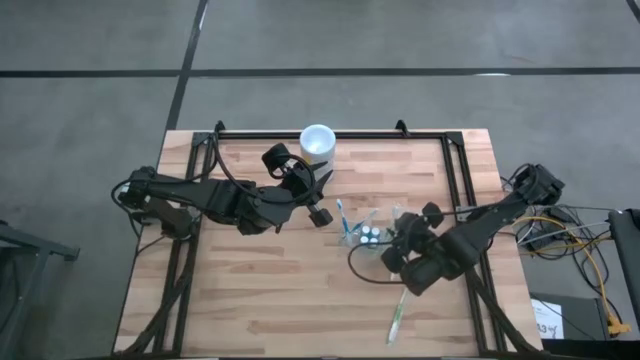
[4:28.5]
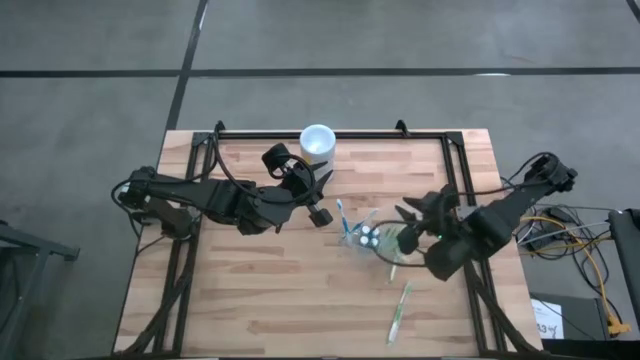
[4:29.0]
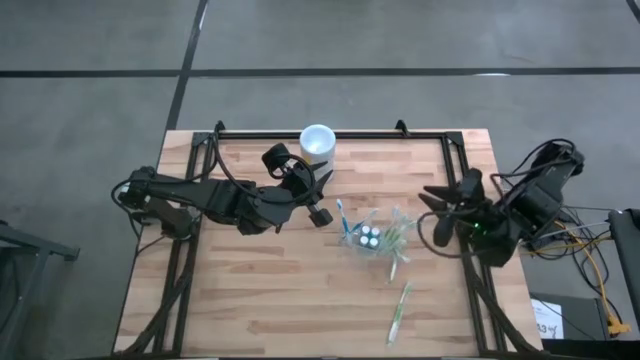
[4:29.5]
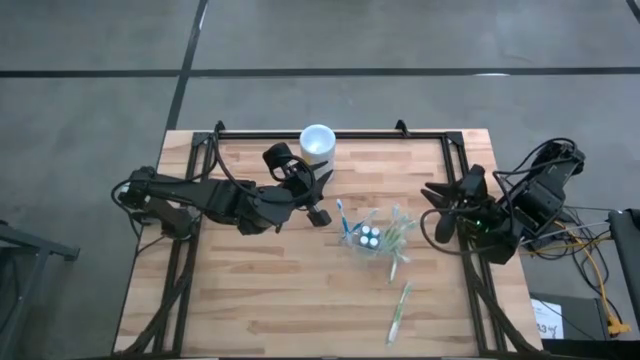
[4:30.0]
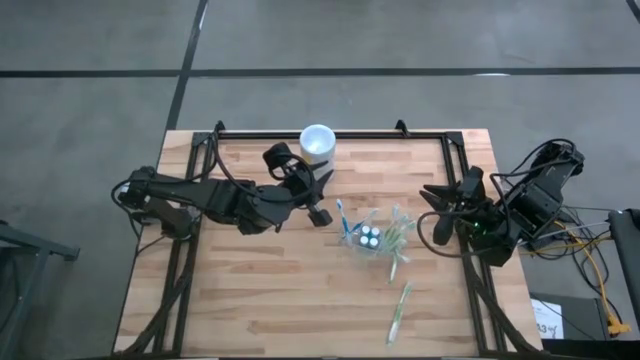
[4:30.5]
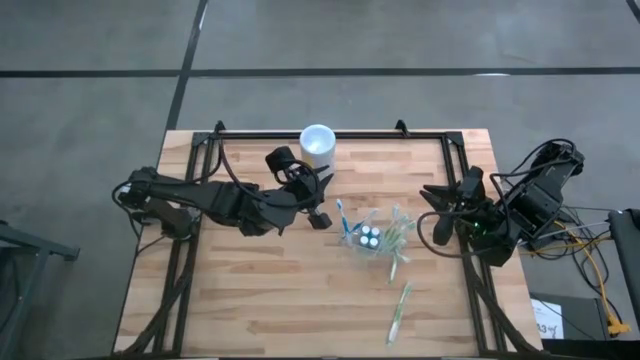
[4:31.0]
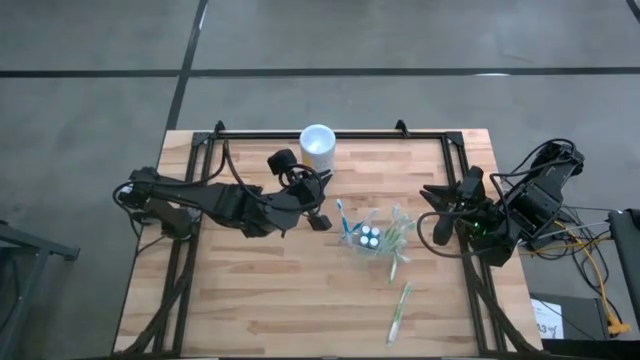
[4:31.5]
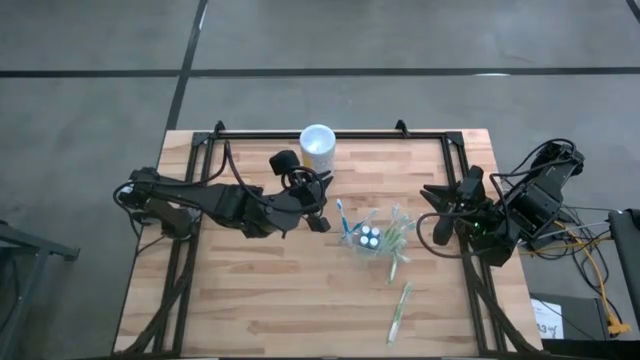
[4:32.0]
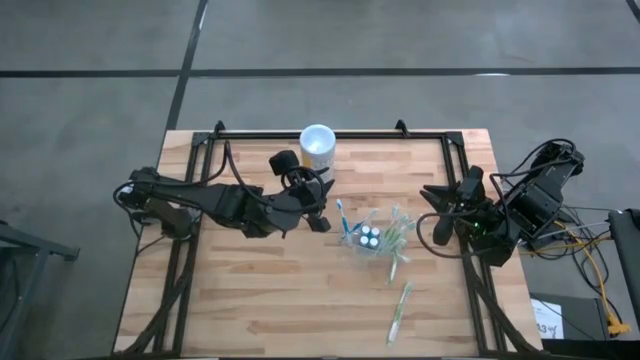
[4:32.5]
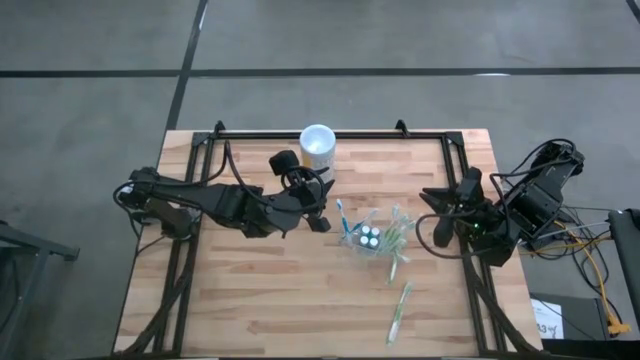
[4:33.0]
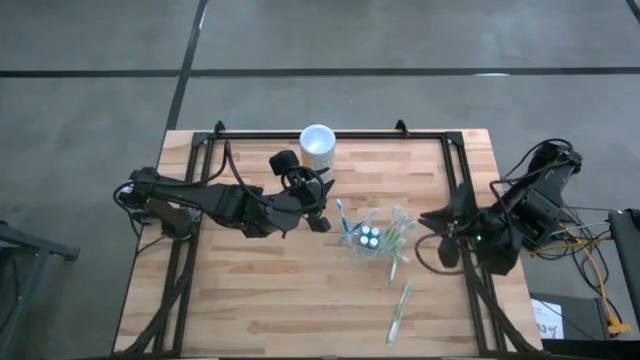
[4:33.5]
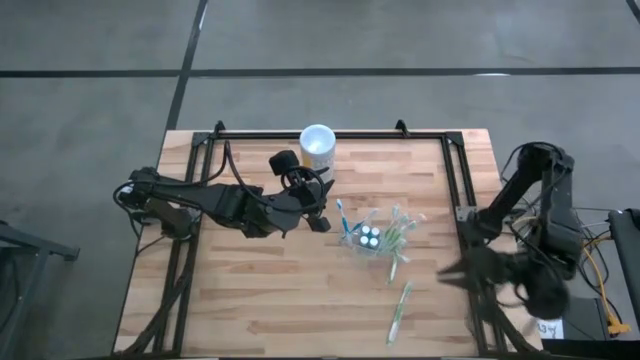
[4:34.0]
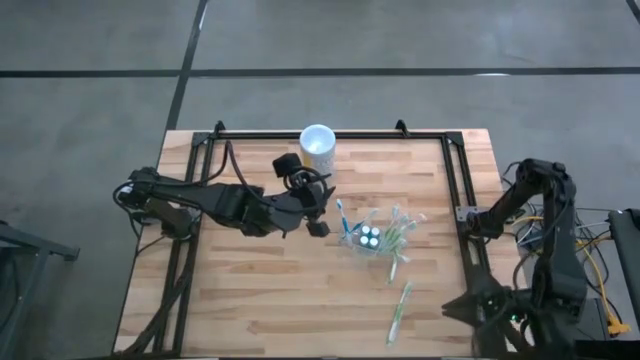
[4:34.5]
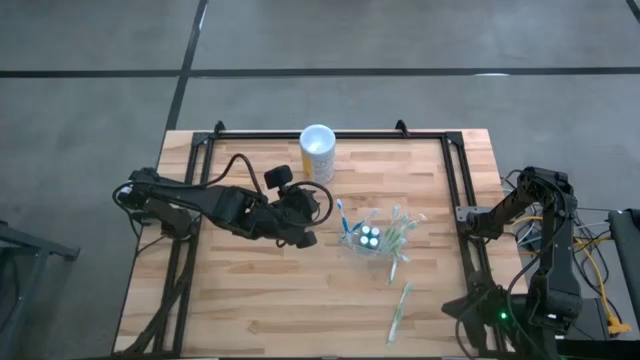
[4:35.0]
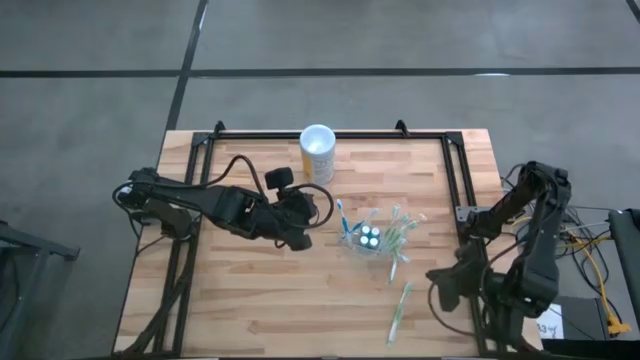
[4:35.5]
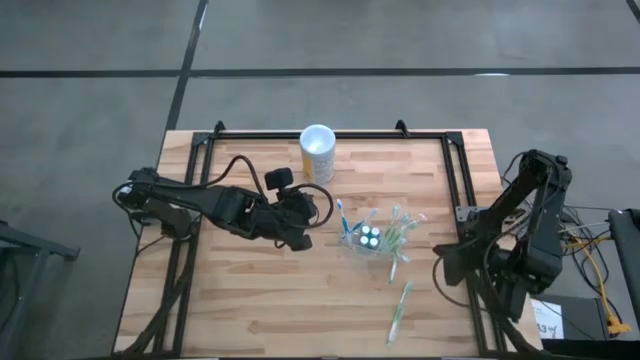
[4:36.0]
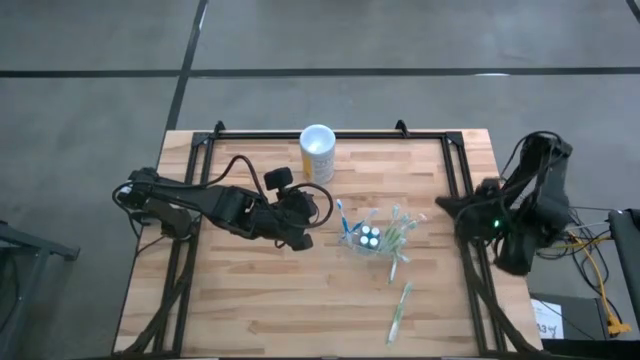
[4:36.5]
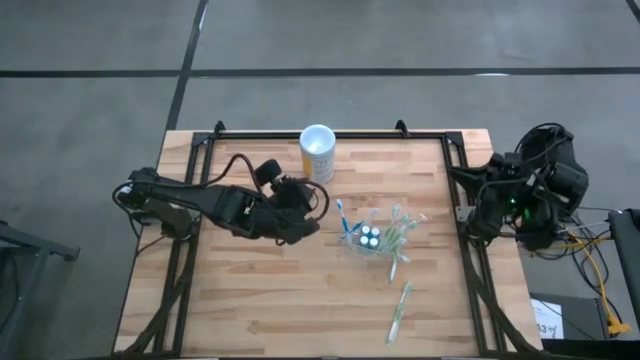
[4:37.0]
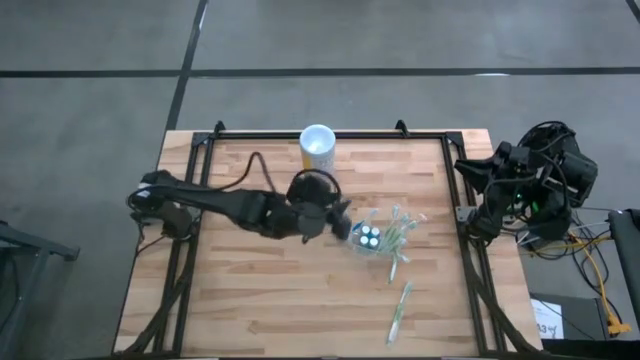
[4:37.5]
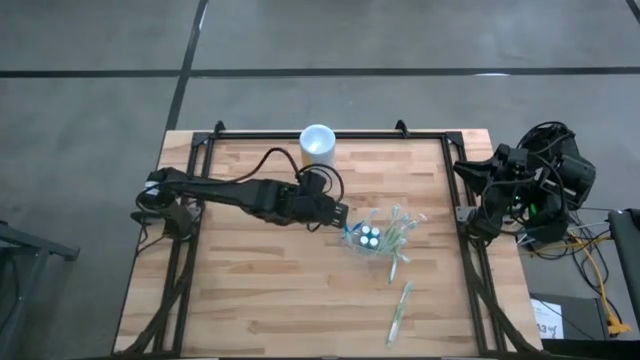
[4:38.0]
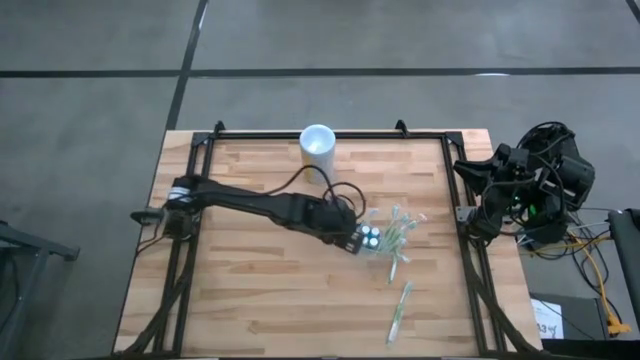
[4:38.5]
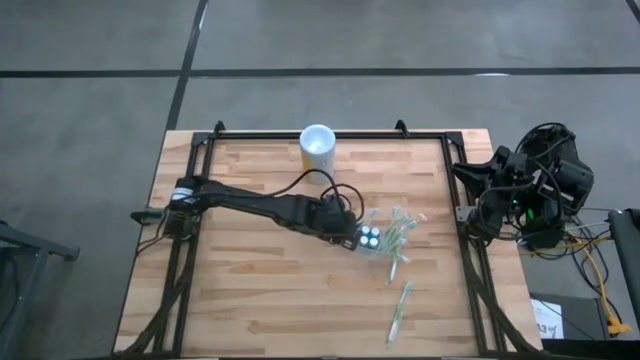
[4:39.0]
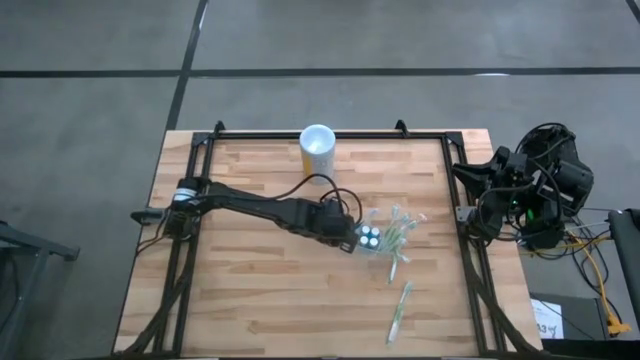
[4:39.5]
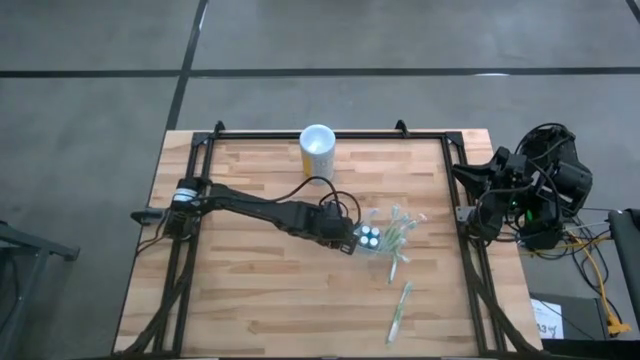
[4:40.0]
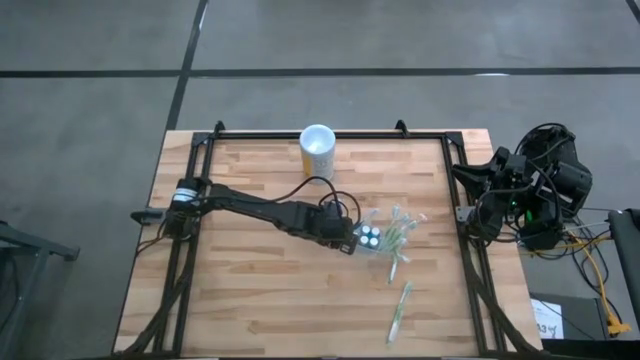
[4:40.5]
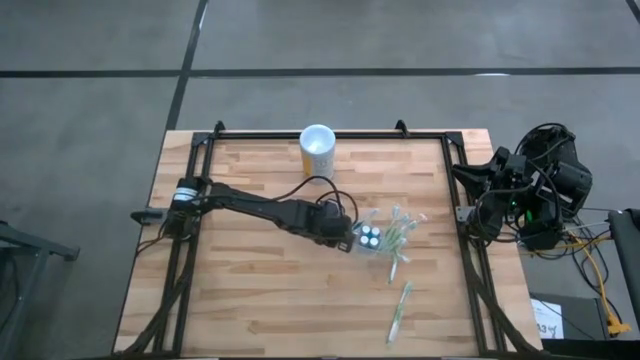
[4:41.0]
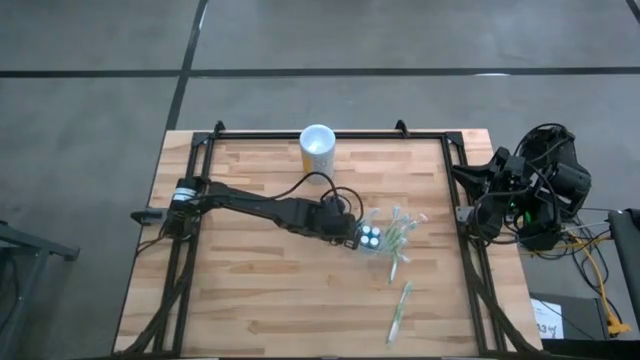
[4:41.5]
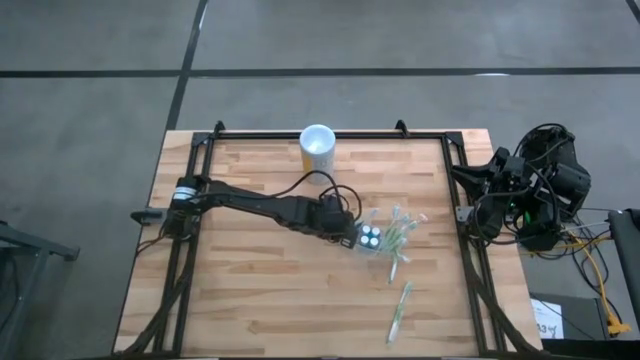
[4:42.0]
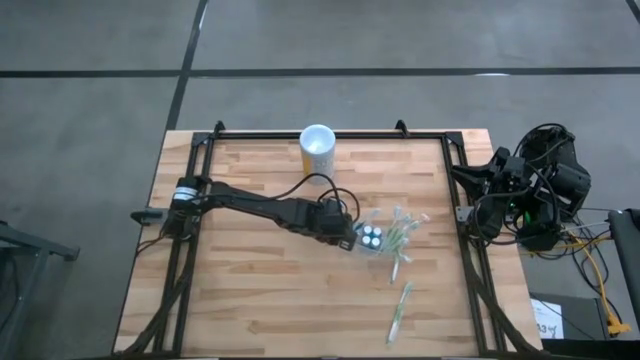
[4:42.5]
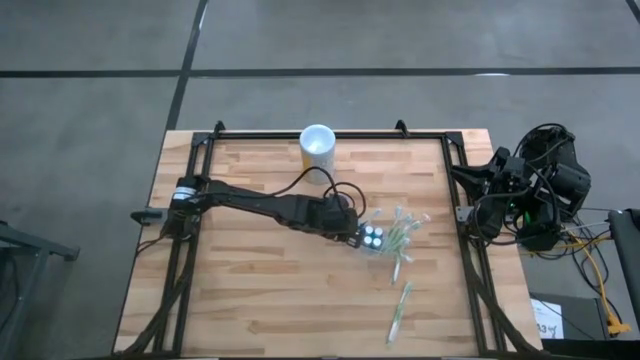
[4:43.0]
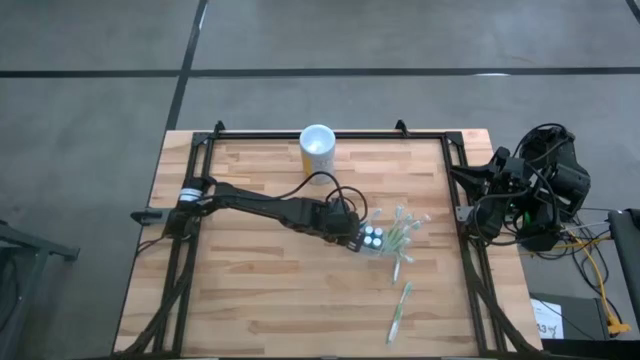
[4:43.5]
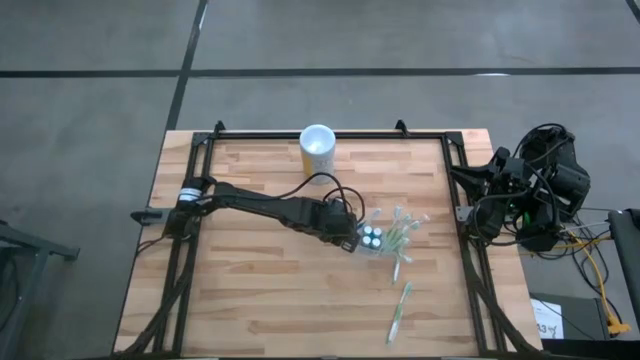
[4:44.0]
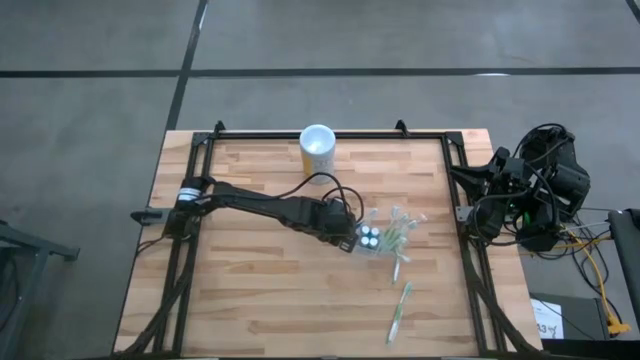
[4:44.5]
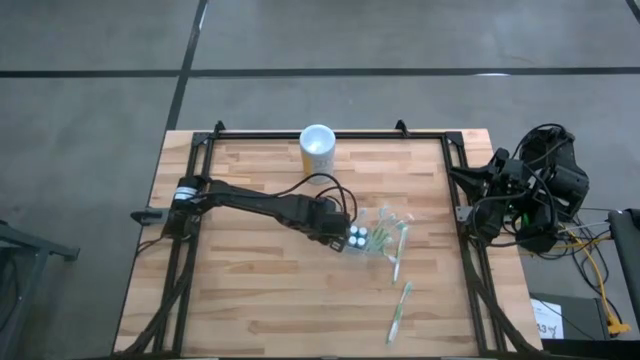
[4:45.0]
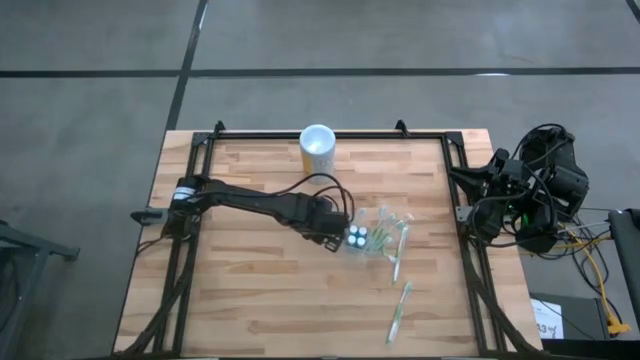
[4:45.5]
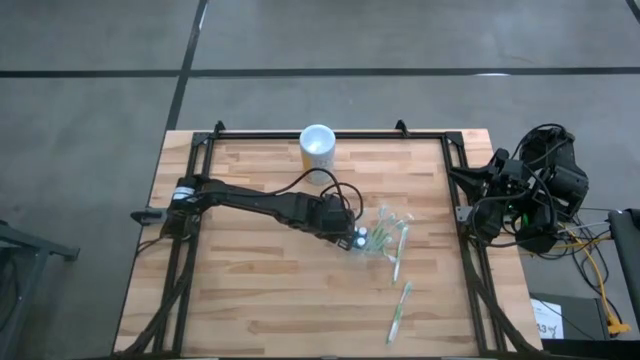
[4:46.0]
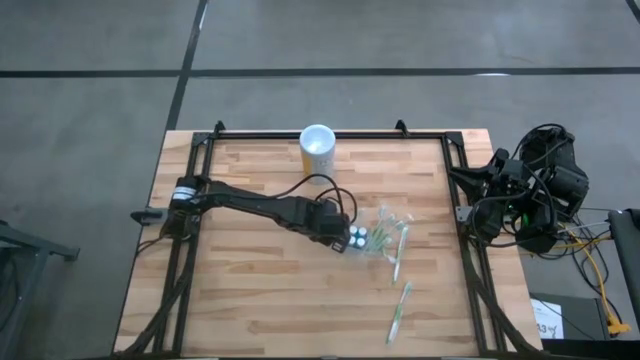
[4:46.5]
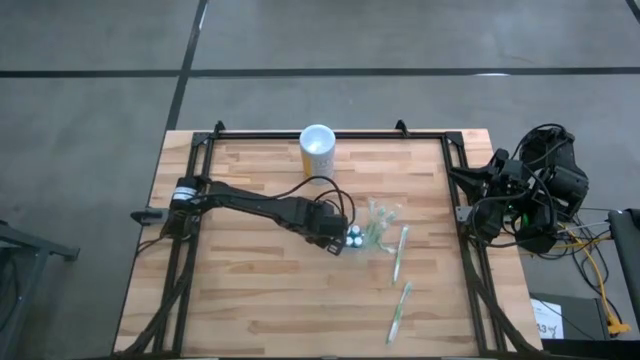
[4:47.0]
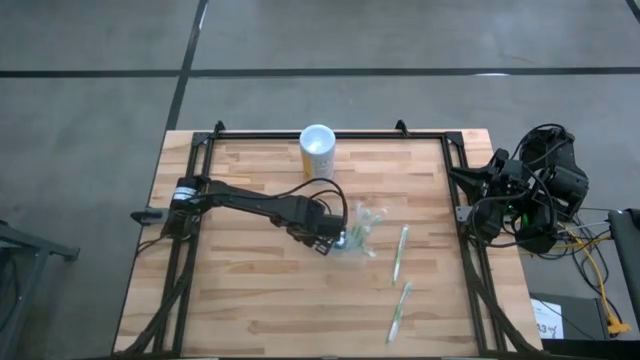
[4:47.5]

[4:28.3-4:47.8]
Task: Pick & Place toothbrushing station
Adjust the transparent organizer on the table

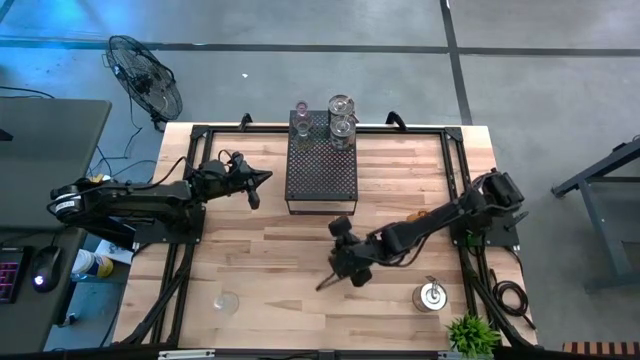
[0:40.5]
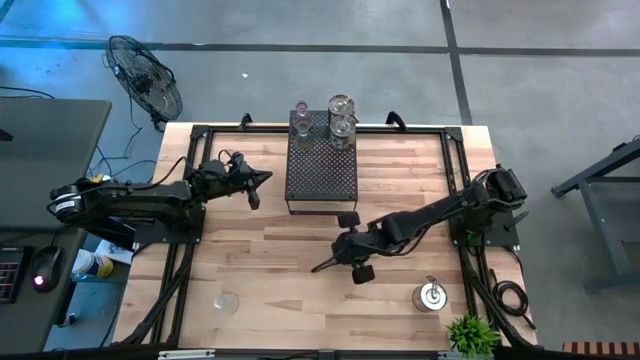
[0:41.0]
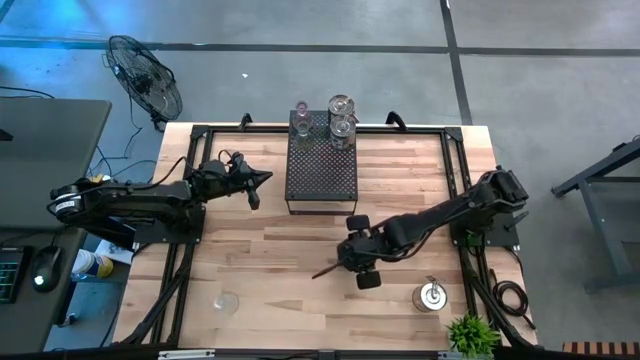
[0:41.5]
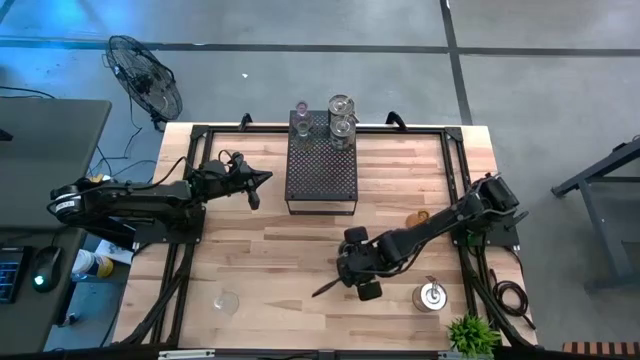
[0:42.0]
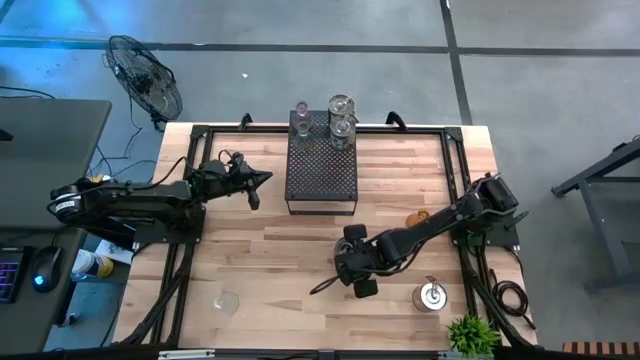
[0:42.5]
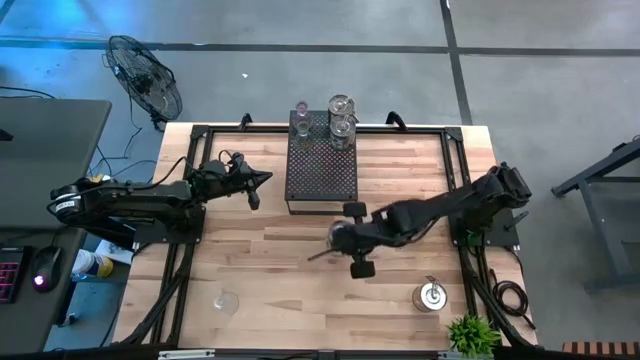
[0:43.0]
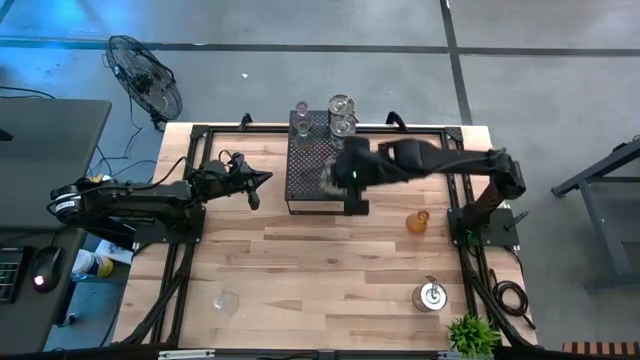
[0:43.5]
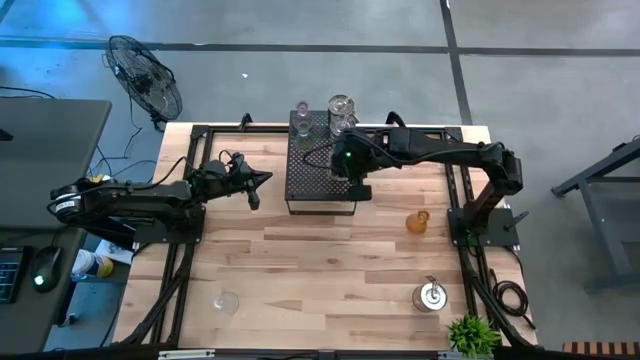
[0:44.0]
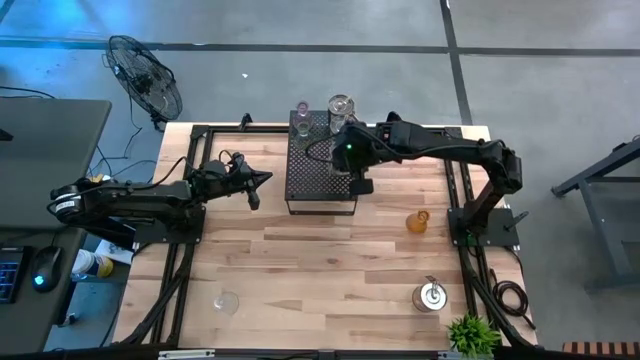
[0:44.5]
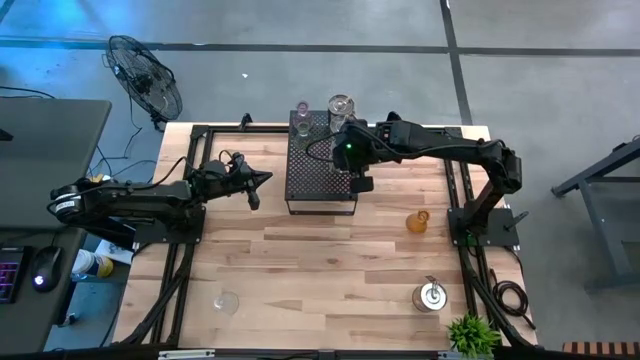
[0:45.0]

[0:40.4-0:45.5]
Task: Pick & Place candle stick holders
Put the green scented candle holder on the shelf
